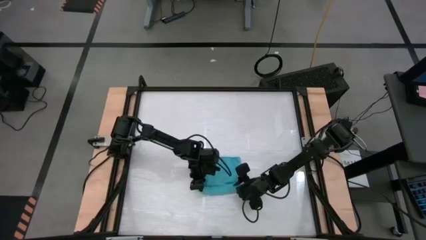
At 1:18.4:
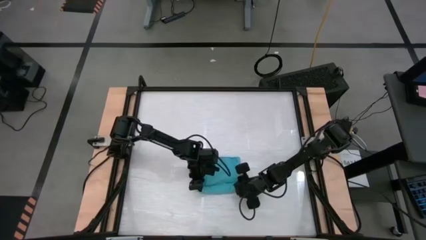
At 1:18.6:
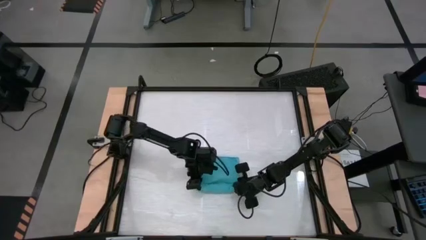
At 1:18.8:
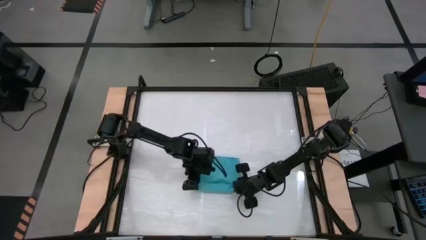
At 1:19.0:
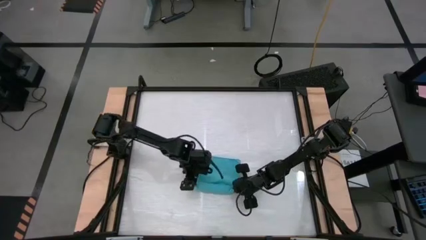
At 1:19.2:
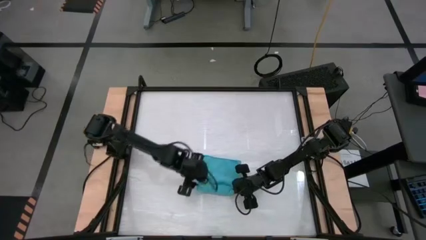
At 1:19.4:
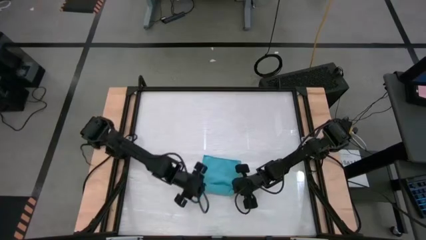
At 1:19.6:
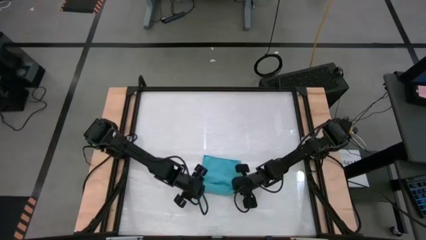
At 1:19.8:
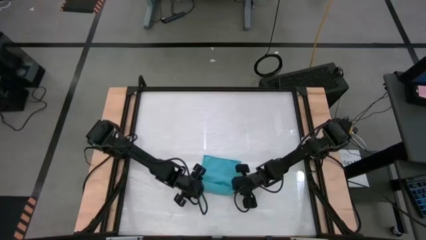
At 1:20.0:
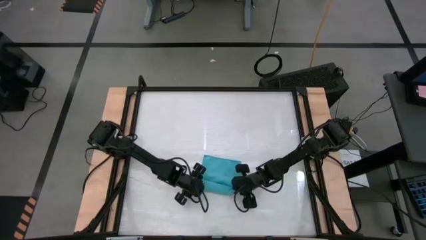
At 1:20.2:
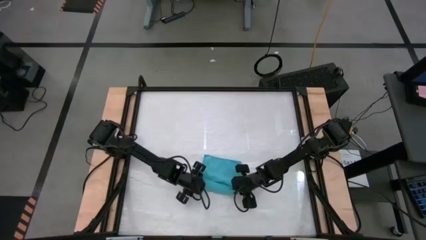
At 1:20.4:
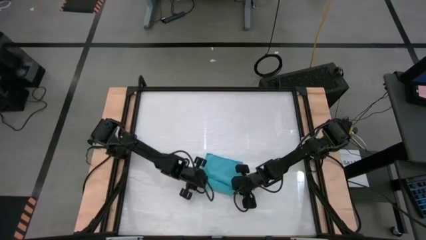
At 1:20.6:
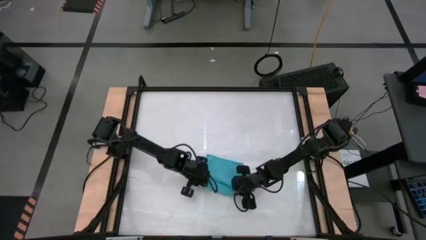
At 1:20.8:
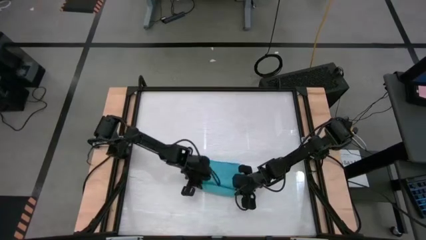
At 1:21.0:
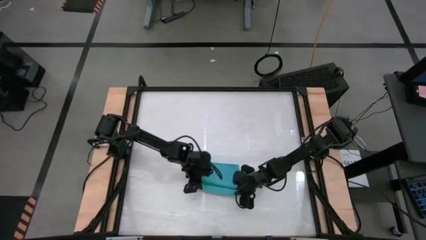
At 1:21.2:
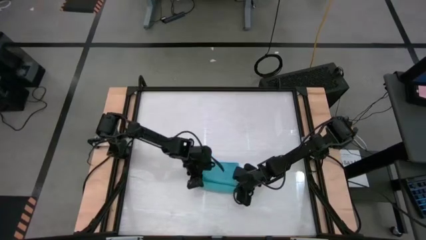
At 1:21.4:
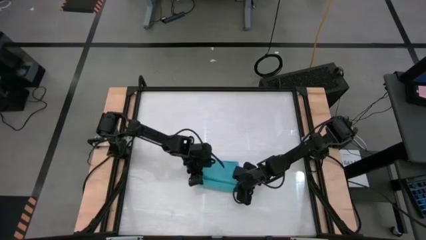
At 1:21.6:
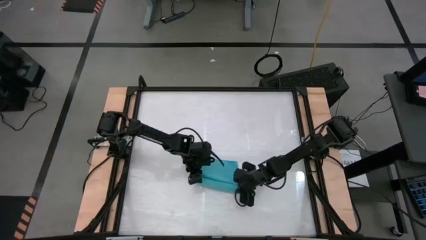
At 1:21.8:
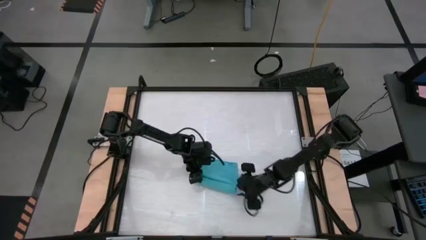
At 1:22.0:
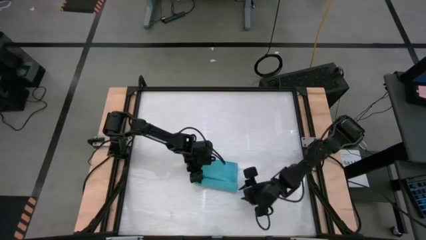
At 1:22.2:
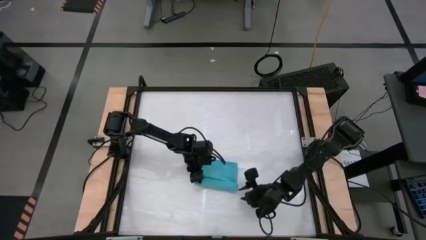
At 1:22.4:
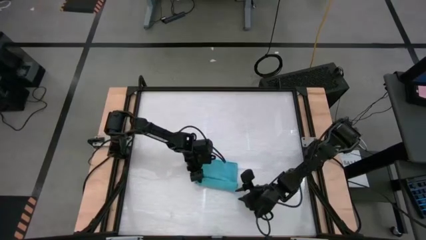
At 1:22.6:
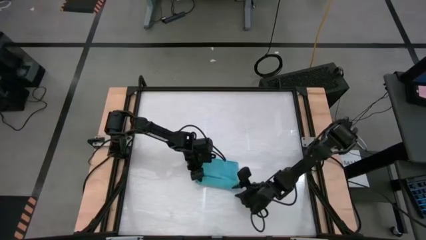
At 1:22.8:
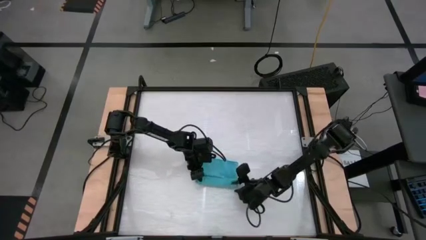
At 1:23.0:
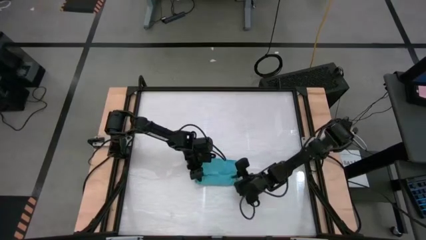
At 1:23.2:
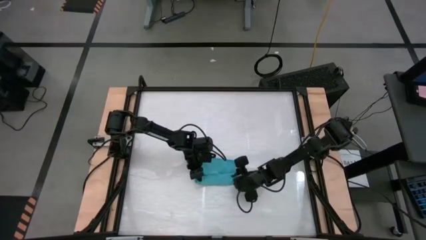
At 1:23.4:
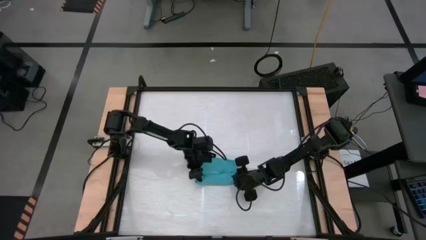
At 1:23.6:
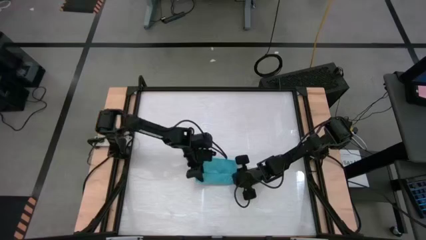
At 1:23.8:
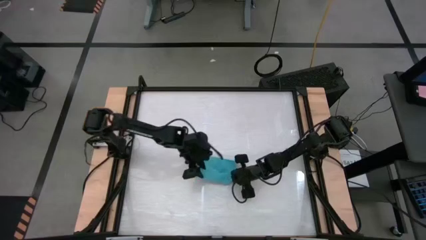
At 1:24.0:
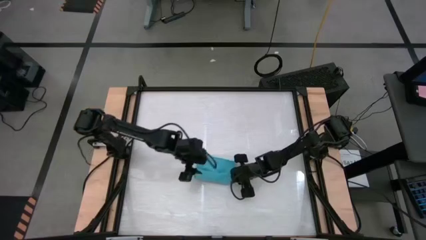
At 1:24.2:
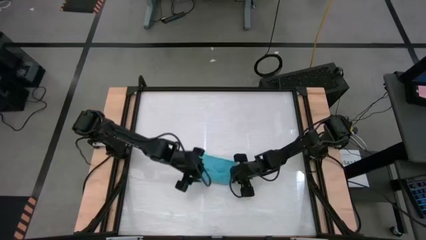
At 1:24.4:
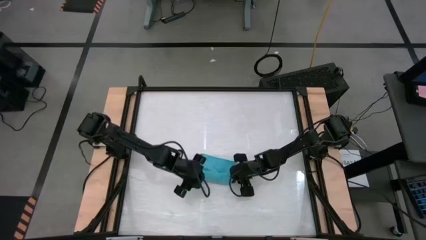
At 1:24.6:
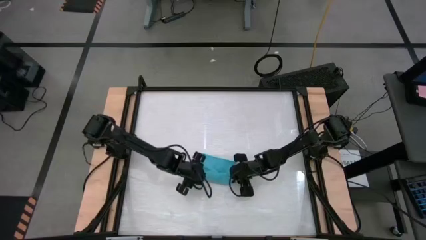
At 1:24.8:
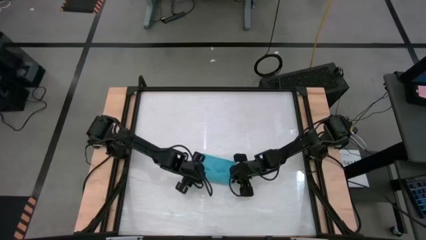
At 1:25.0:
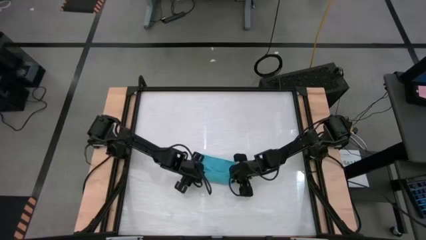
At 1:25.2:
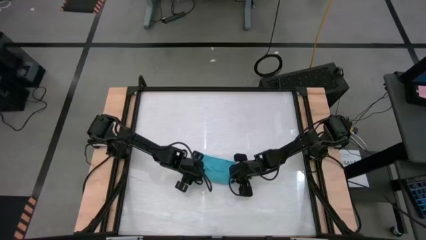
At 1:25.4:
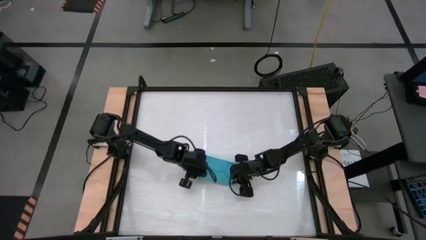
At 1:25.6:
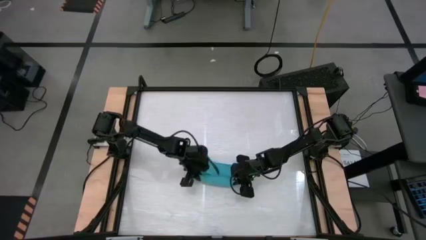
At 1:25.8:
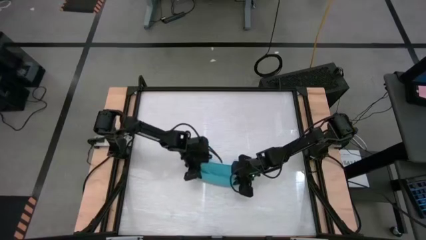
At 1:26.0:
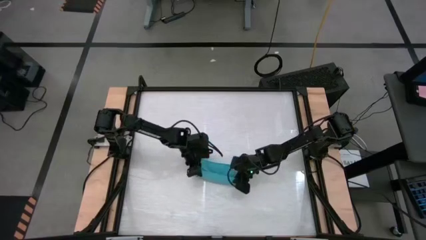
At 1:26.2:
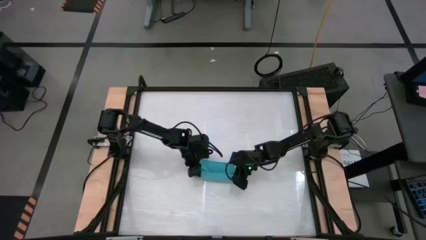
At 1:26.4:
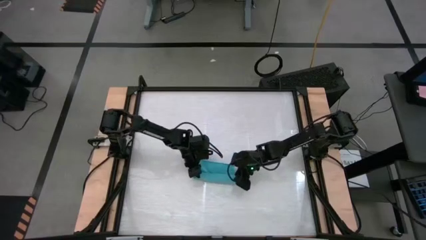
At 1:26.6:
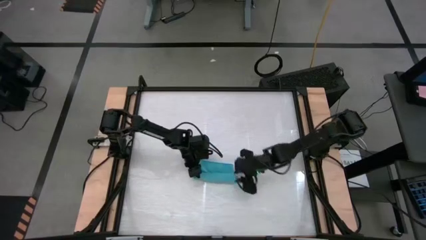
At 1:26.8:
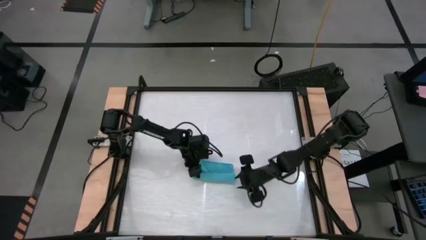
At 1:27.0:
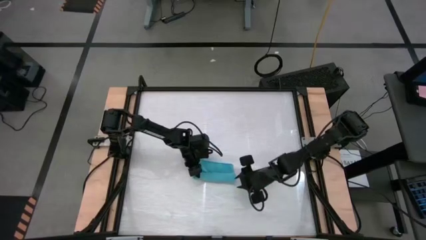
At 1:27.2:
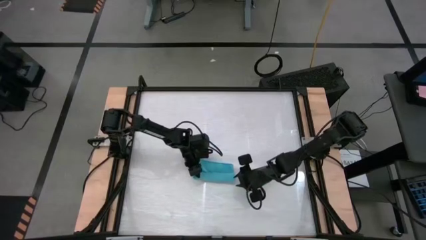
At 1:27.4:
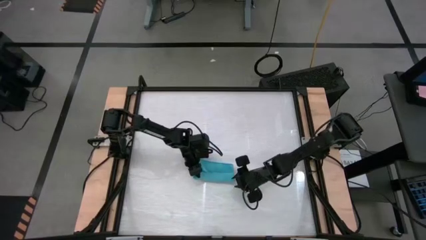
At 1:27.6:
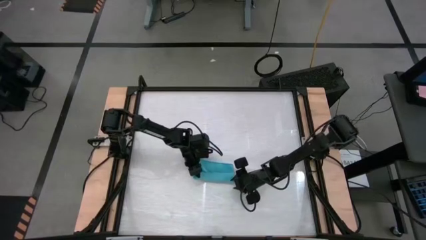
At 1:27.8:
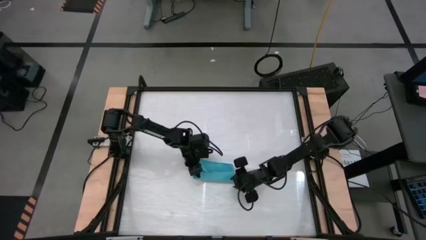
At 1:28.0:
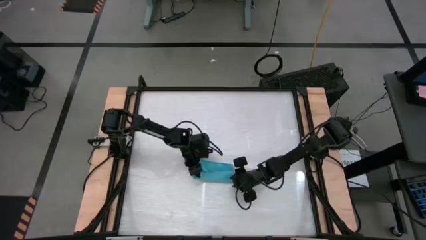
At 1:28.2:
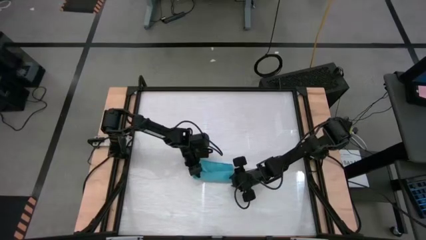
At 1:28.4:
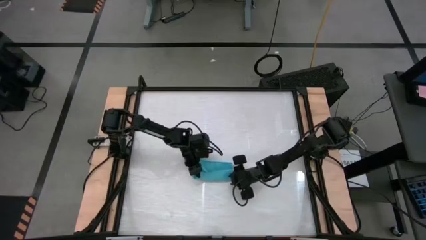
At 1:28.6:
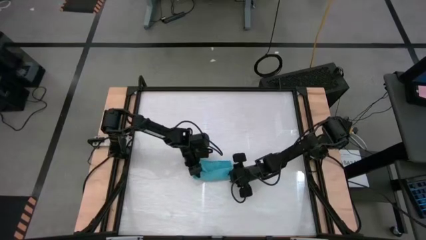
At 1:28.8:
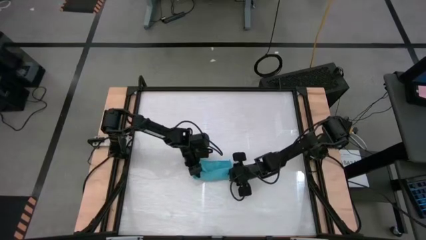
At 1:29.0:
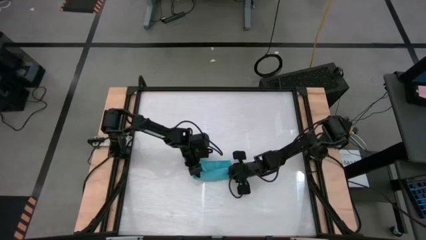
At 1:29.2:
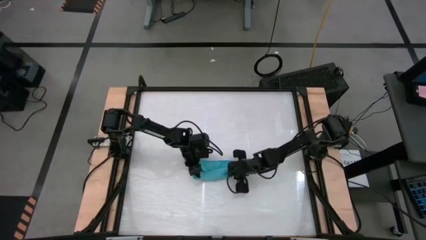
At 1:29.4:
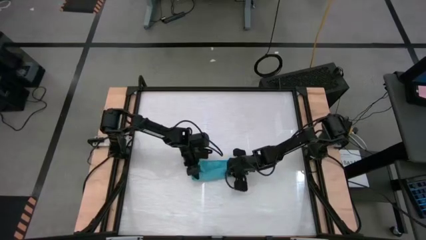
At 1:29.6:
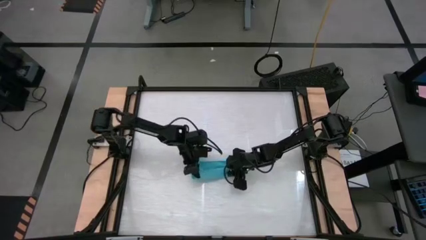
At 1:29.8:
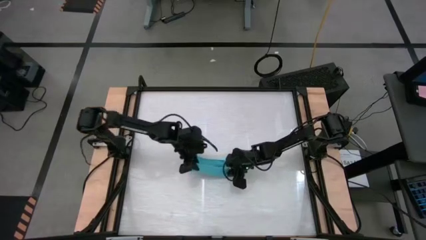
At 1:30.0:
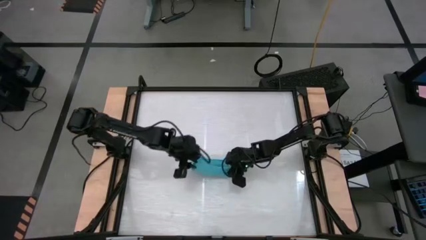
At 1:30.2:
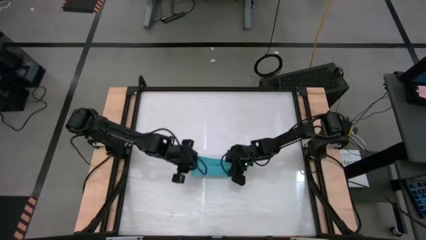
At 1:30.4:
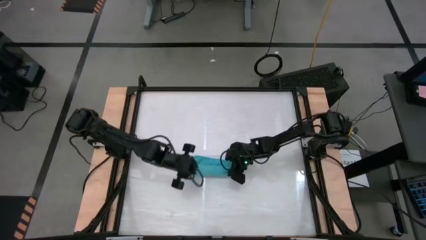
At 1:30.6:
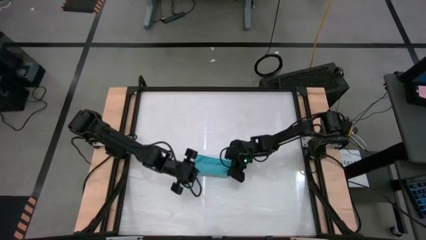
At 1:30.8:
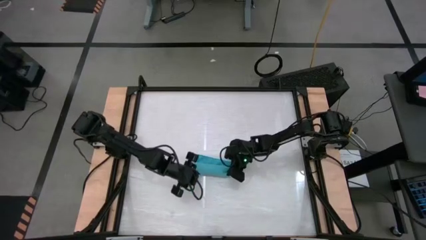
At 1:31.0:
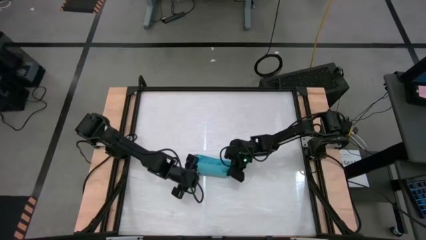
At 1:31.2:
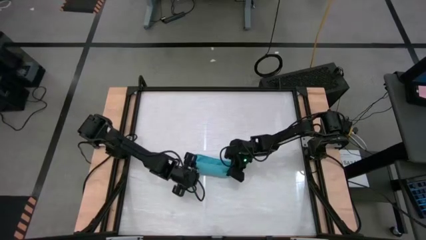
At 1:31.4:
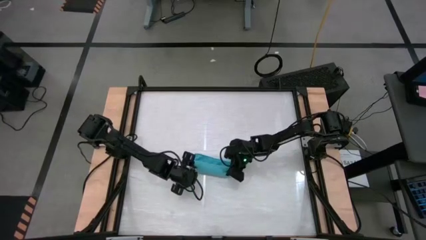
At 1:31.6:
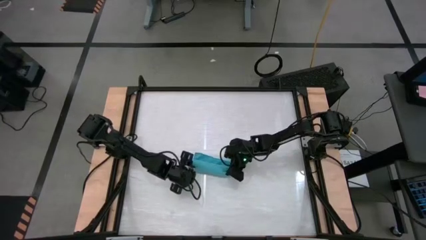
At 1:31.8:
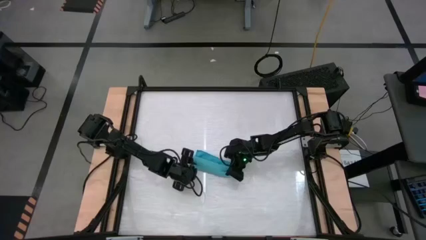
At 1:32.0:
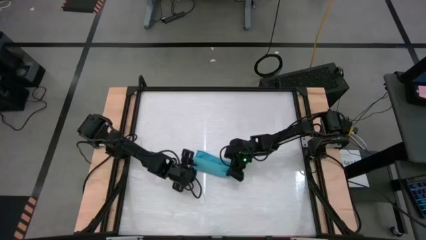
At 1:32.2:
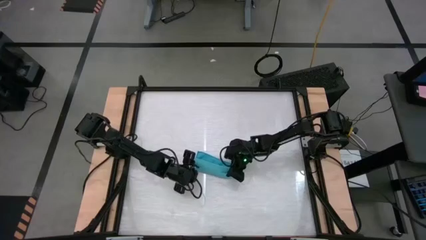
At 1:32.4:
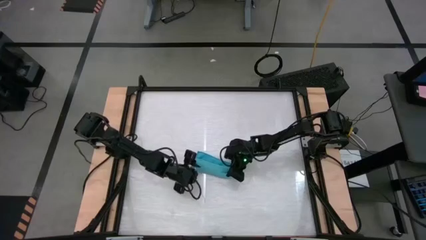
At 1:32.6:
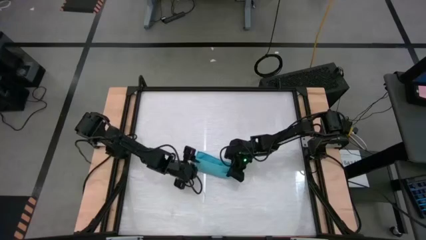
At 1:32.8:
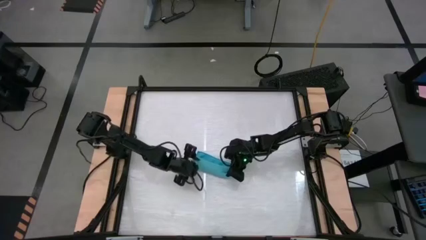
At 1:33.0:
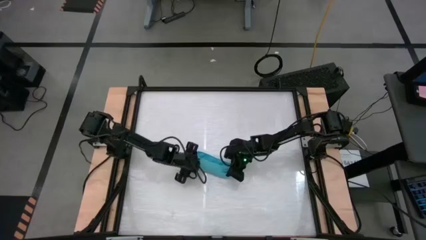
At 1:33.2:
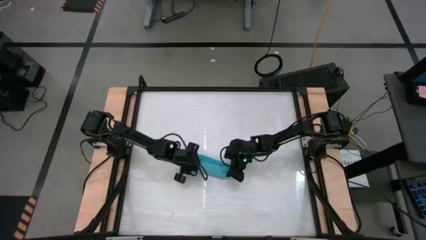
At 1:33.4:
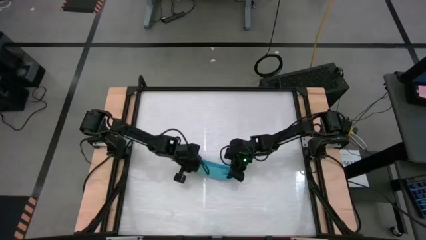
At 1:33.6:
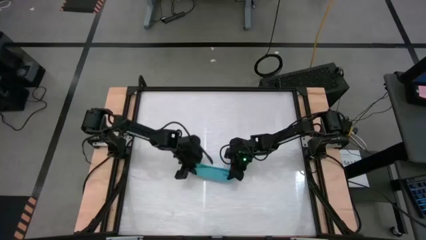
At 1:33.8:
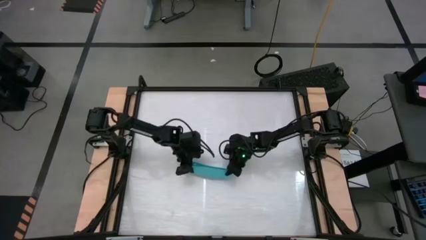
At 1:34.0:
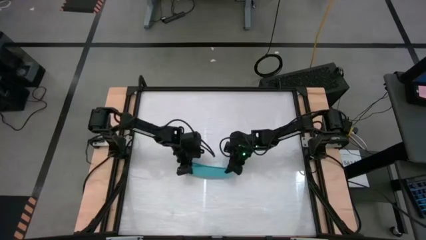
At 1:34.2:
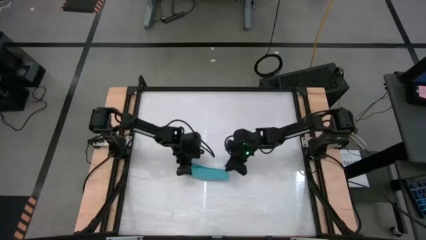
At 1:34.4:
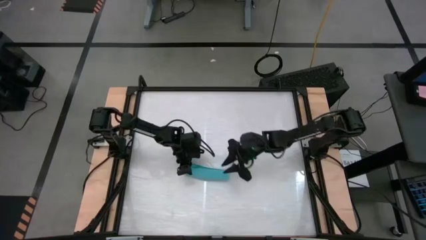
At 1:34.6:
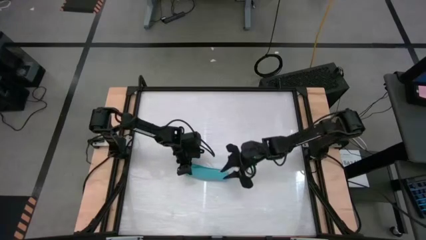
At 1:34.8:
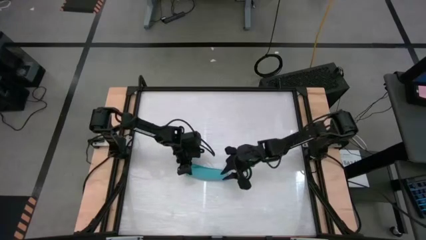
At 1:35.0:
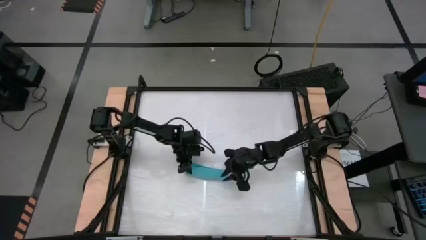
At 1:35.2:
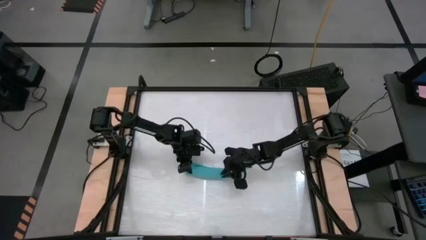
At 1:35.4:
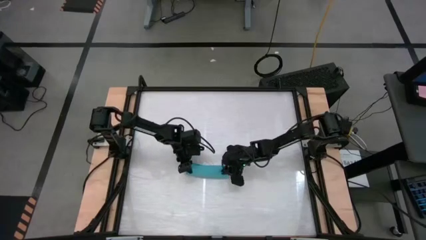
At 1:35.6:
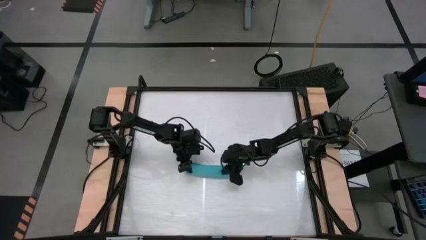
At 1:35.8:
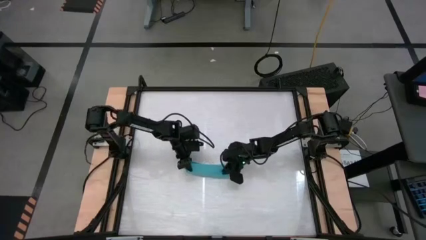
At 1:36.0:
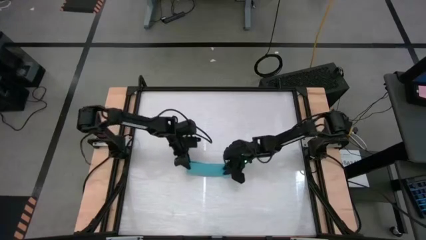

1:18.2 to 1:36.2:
Task: Roll towel
Roll the blue microfiber towel
